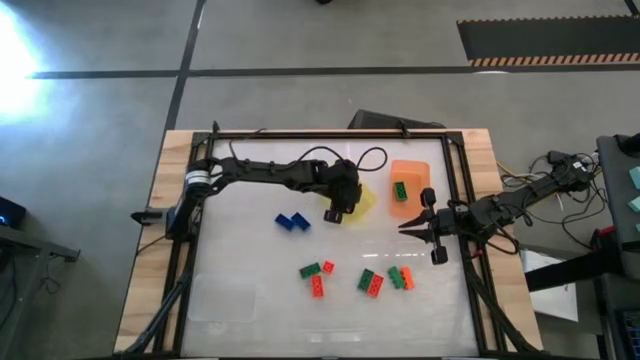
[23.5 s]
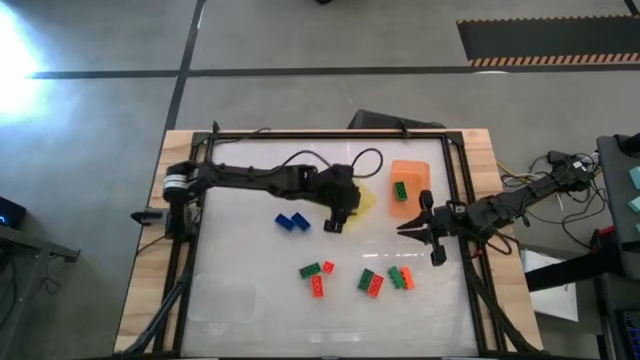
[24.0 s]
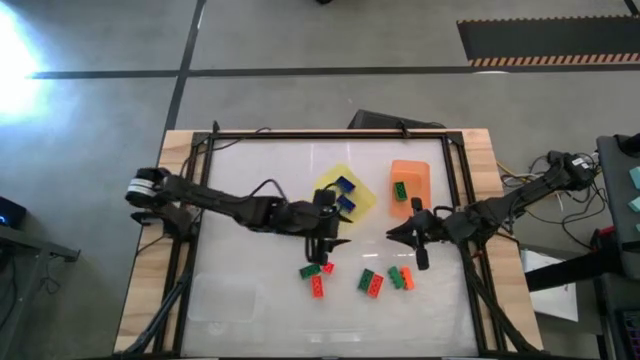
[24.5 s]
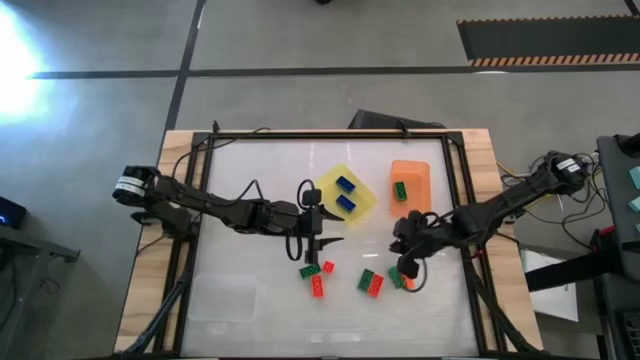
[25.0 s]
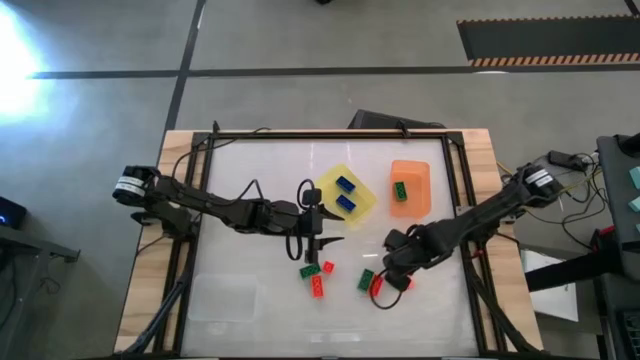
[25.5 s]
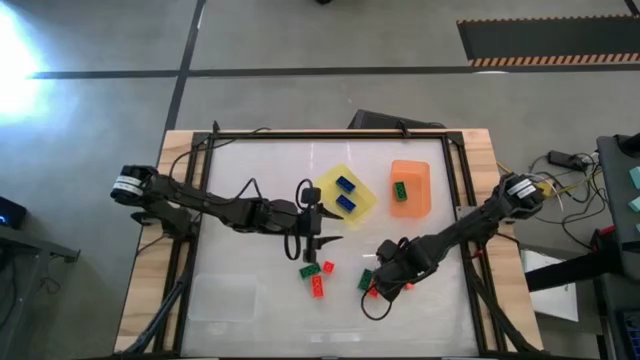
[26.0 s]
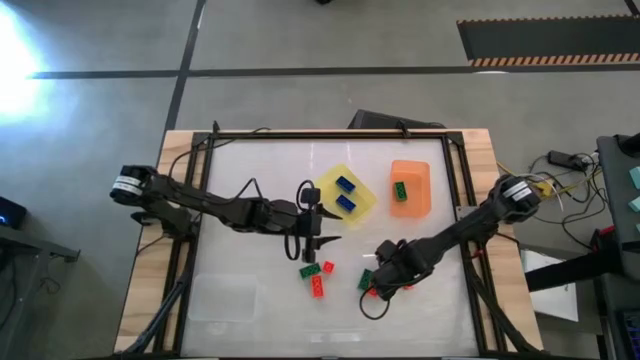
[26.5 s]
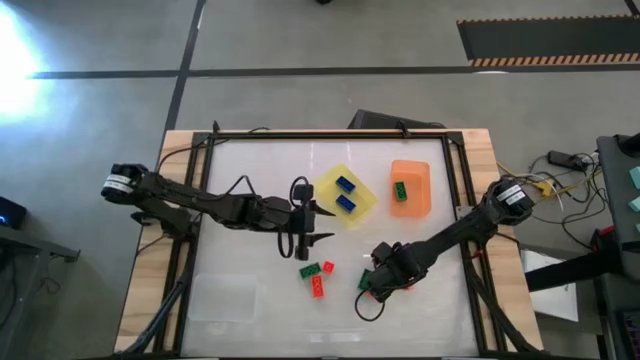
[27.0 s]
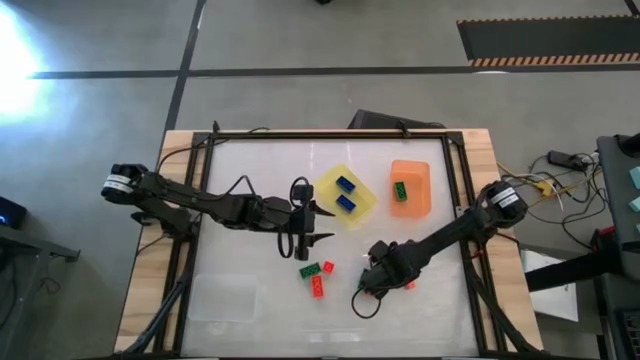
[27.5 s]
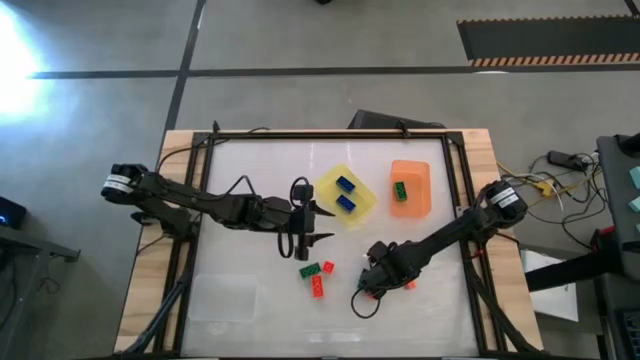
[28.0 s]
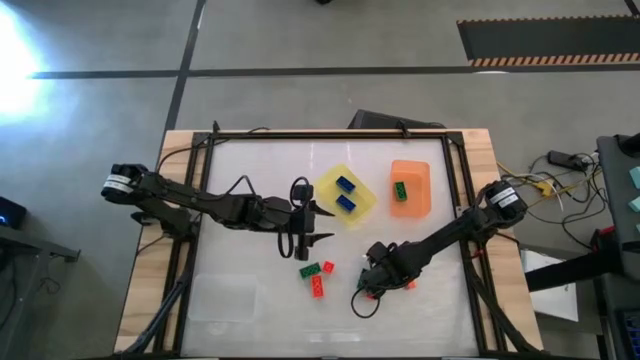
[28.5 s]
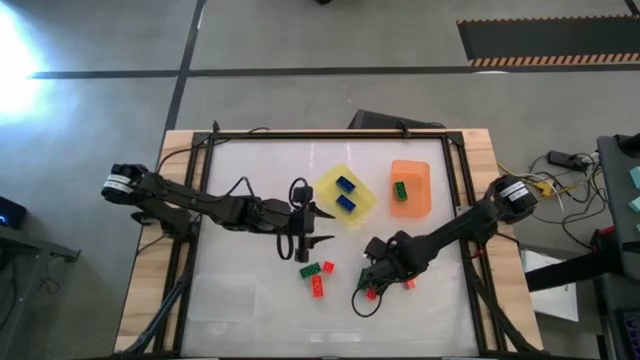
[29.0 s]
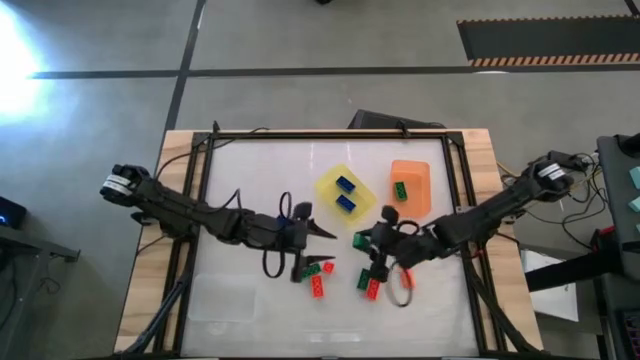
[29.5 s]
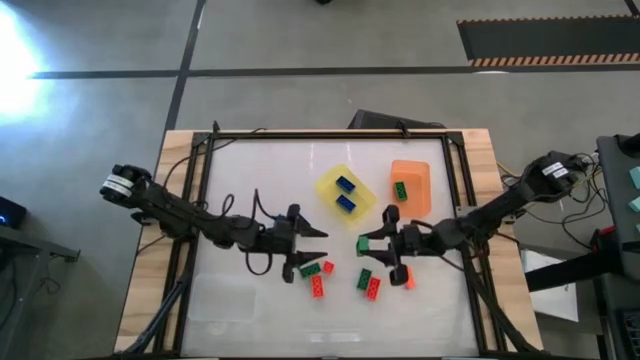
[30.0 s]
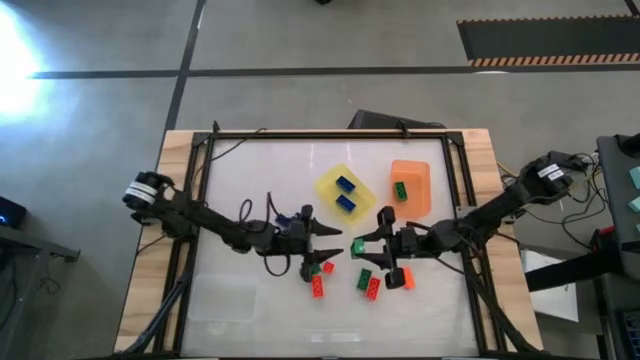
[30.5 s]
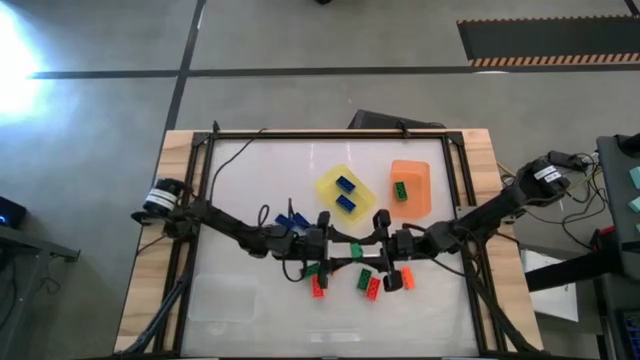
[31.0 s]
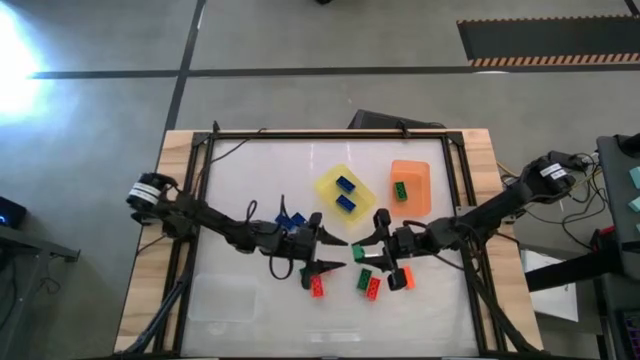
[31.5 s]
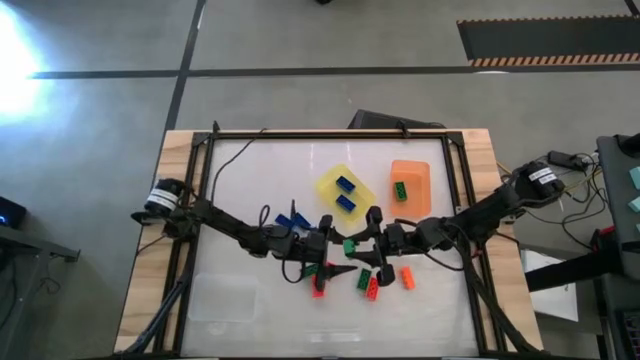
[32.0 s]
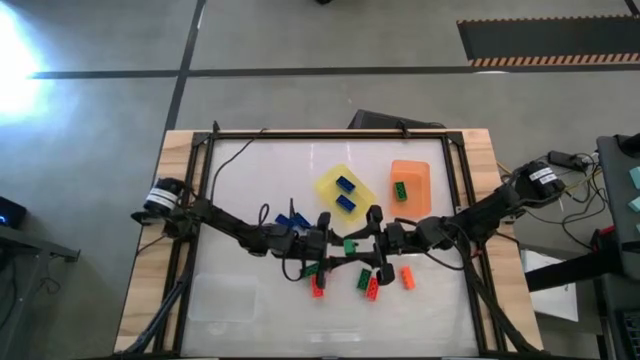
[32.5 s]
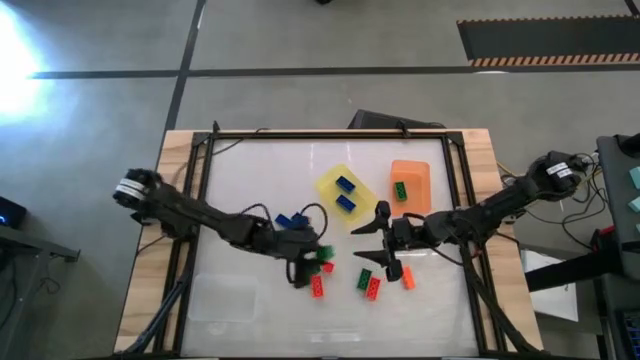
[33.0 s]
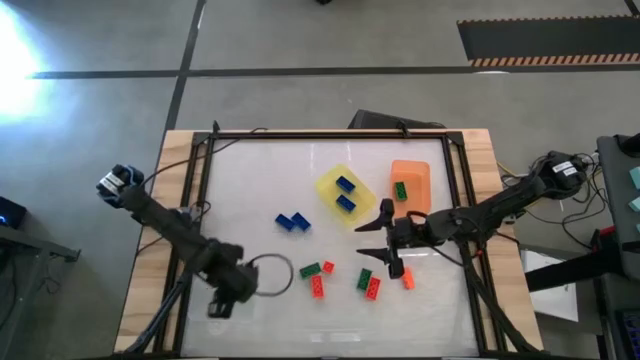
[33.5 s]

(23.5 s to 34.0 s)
Task: Sort & place blocks by color
Put the green game piece into the orange bin

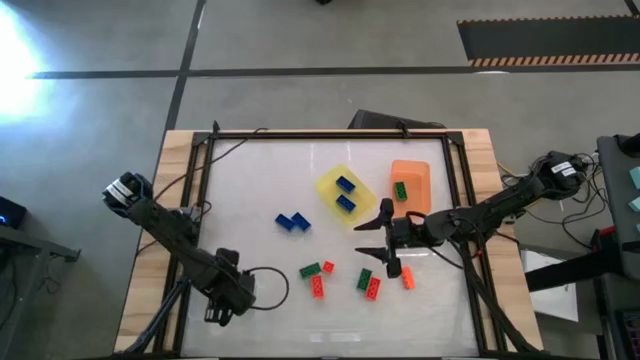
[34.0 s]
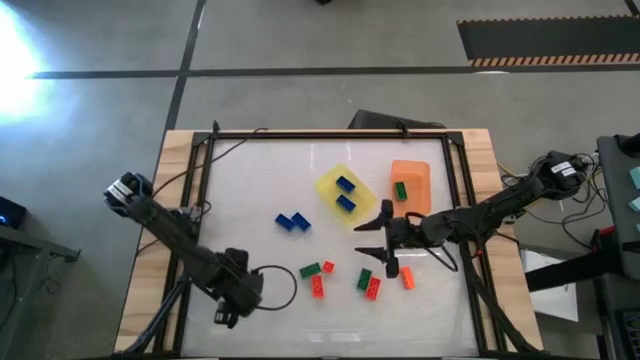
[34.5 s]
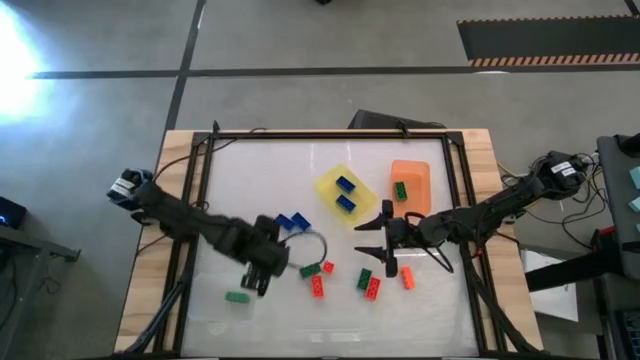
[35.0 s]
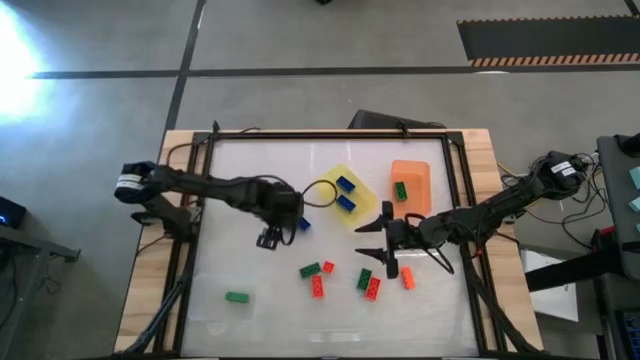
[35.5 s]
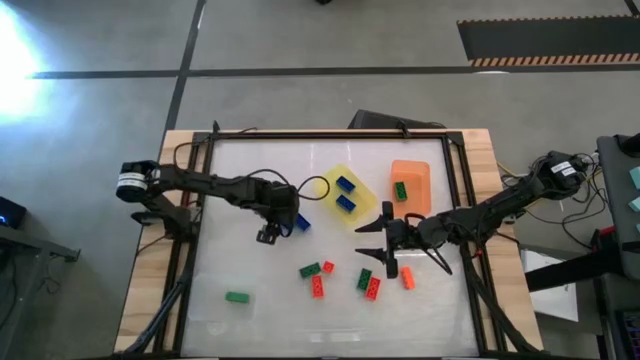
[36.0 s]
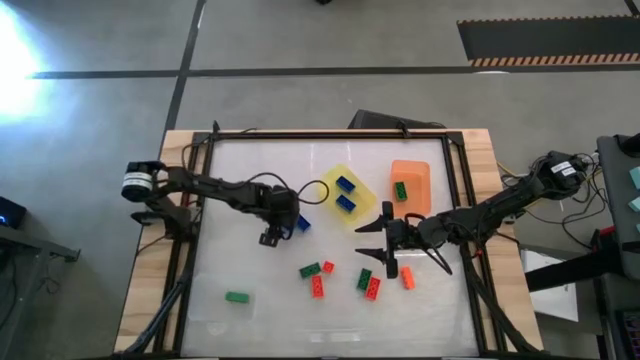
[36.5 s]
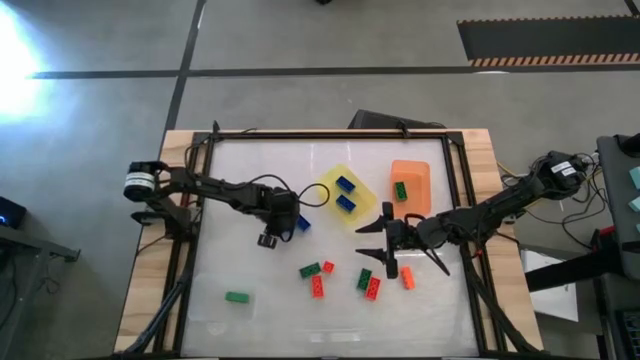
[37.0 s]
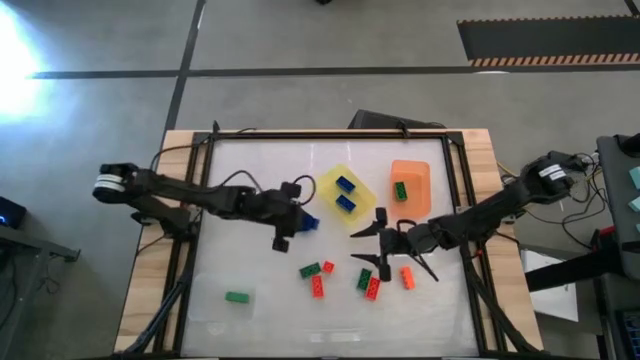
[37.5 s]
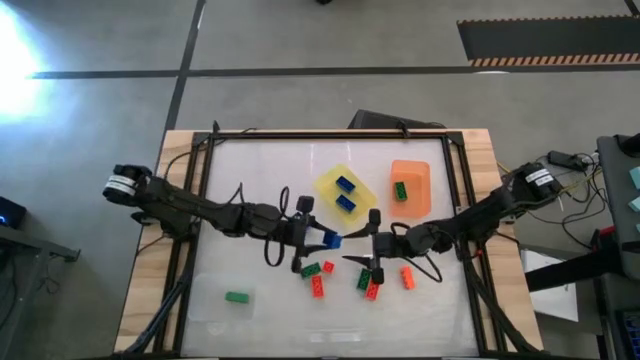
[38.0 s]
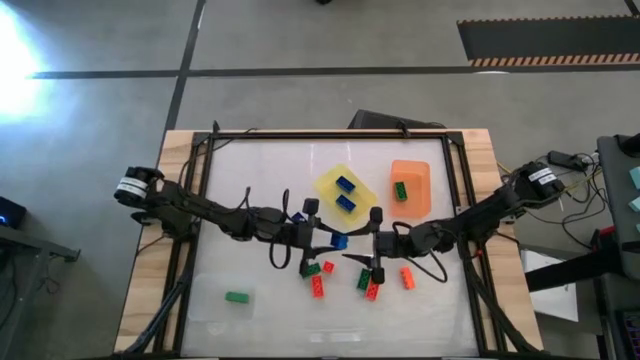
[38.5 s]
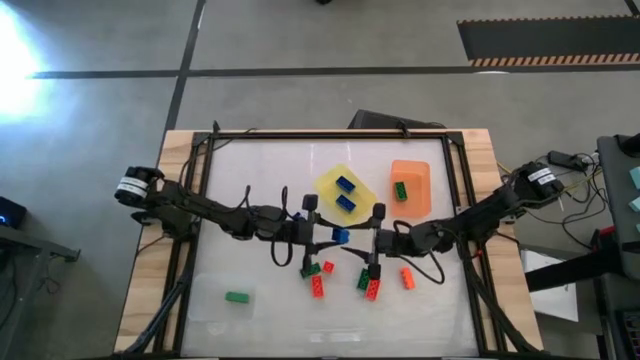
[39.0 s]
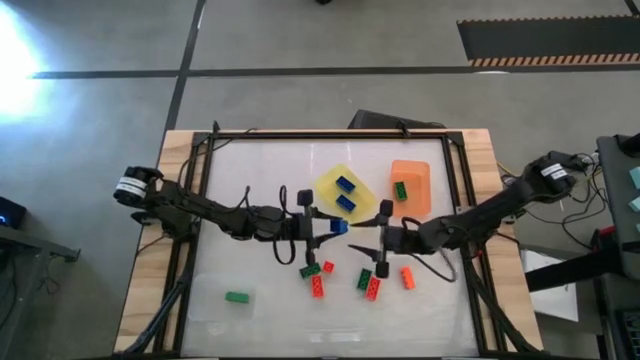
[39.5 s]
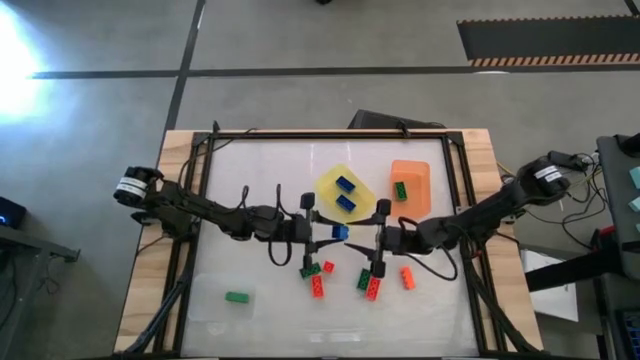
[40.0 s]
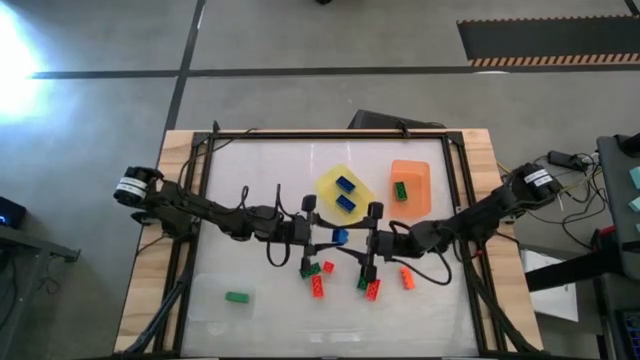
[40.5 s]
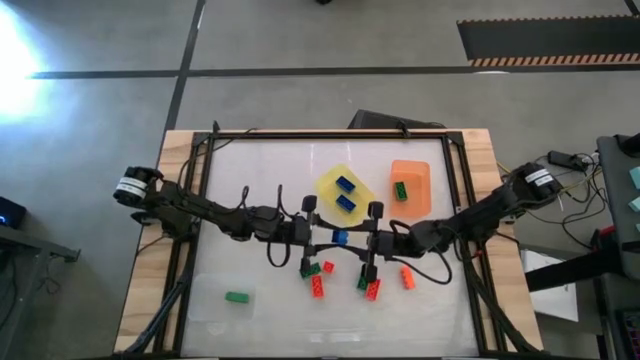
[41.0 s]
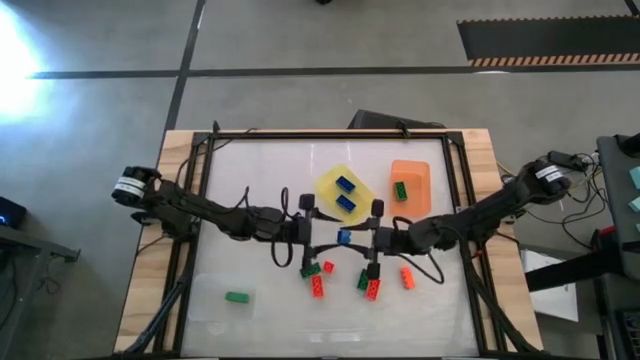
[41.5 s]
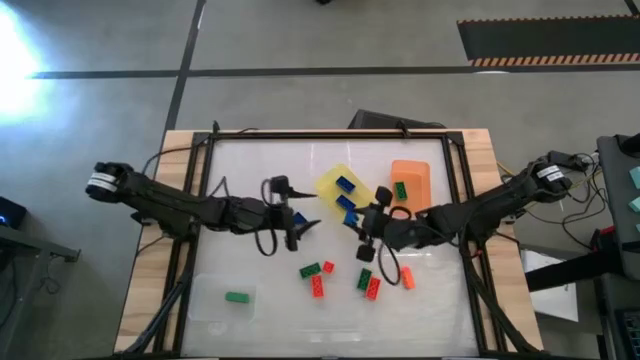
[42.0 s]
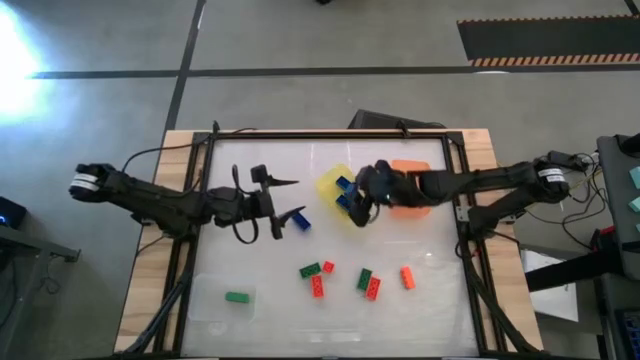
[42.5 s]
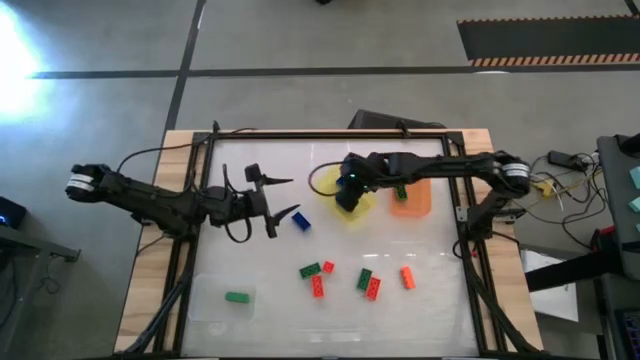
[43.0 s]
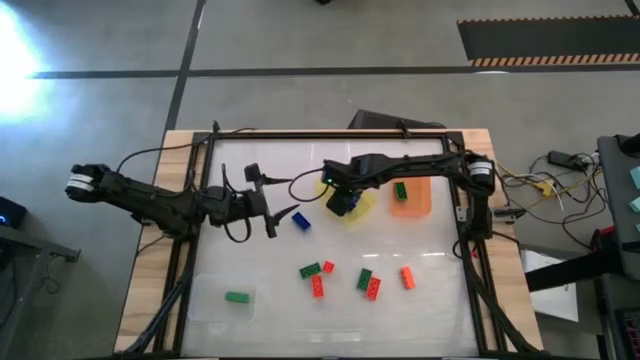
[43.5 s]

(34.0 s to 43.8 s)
Put the blue game piece into the yellow bin

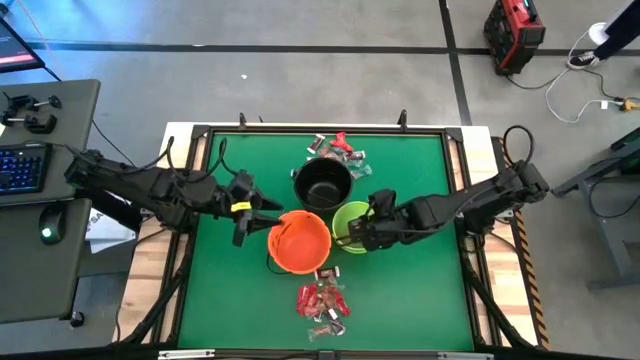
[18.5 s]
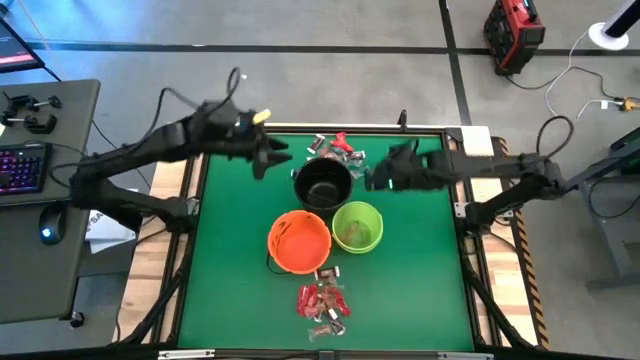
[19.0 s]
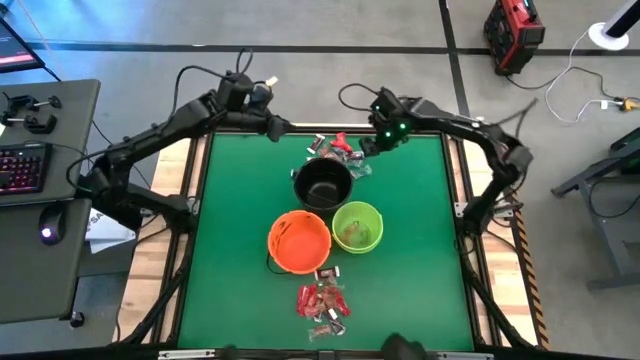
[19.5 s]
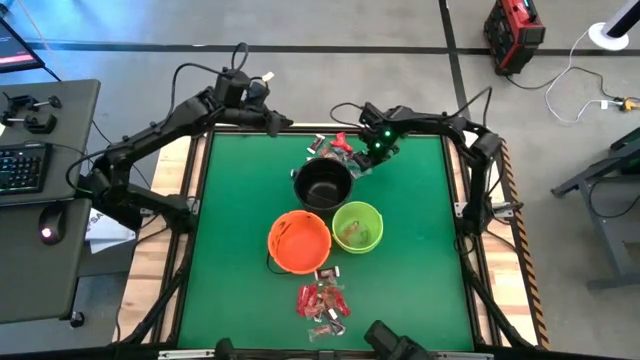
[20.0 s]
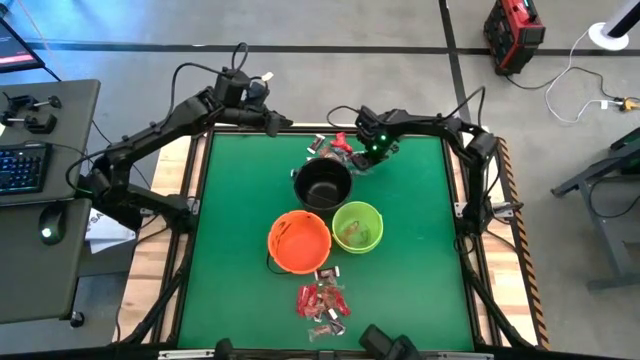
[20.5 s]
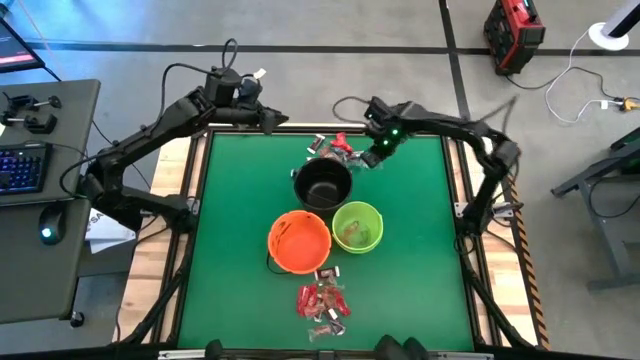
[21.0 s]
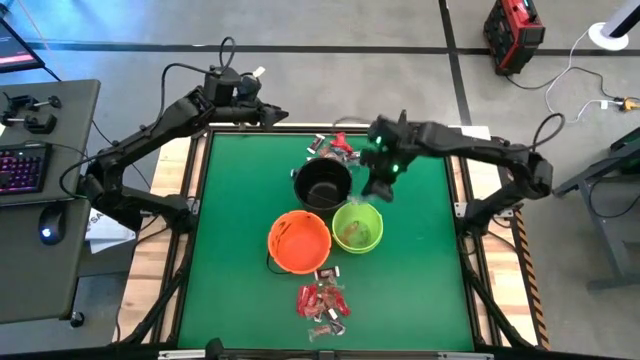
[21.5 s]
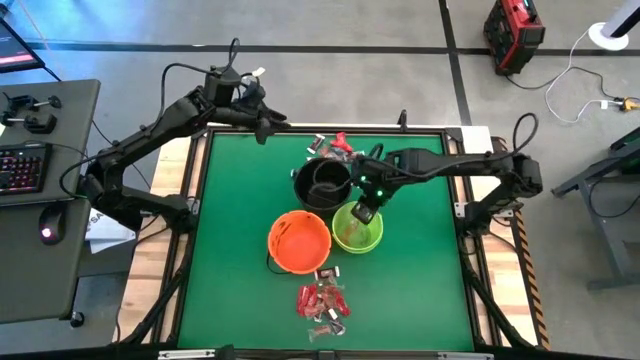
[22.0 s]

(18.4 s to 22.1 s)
Task: Sort candy by brand, put in halloween buckets
Put the blue gummy into the green bucket
